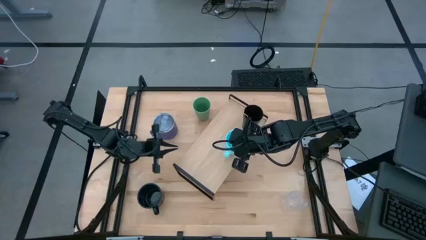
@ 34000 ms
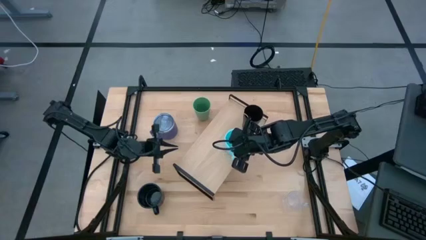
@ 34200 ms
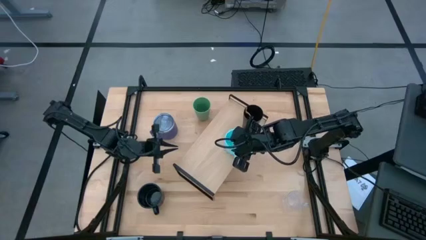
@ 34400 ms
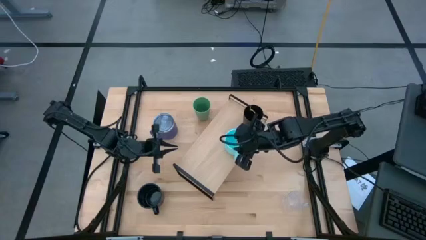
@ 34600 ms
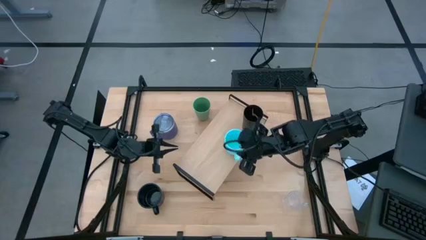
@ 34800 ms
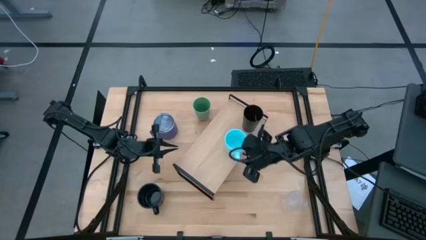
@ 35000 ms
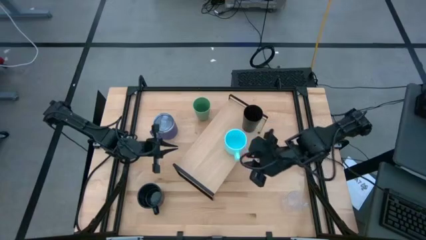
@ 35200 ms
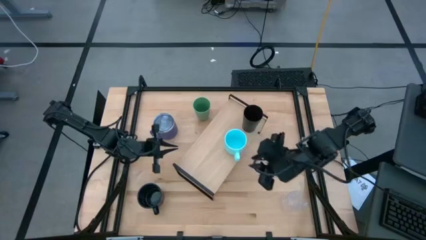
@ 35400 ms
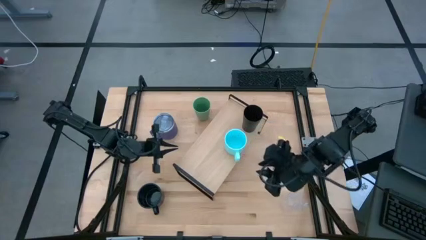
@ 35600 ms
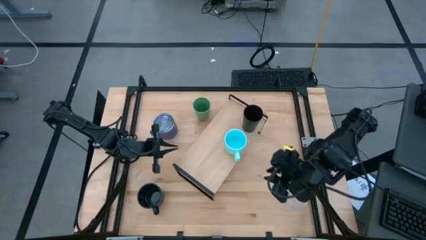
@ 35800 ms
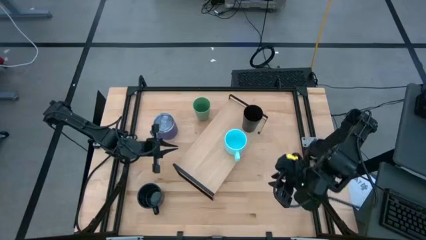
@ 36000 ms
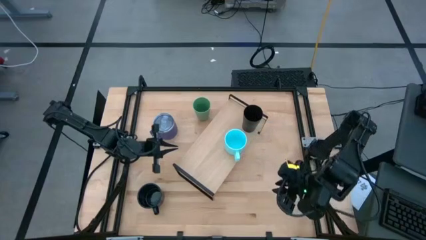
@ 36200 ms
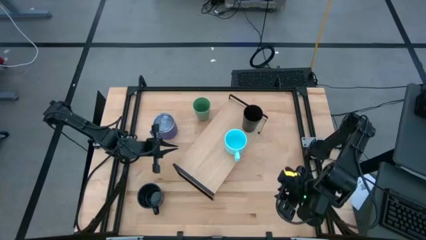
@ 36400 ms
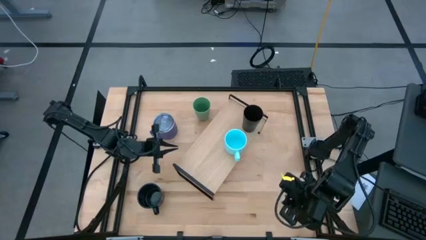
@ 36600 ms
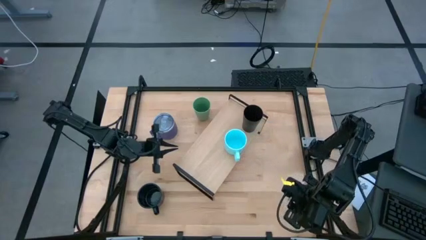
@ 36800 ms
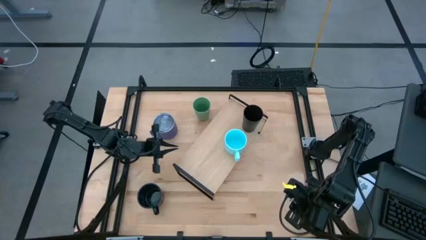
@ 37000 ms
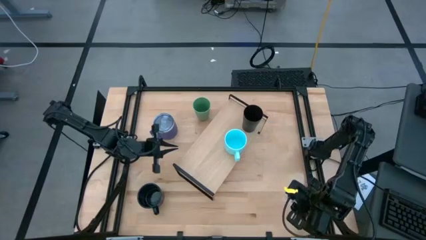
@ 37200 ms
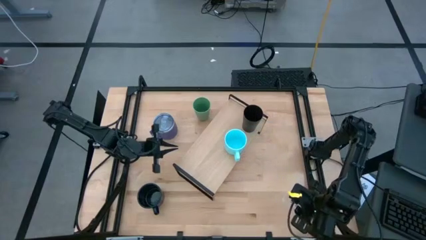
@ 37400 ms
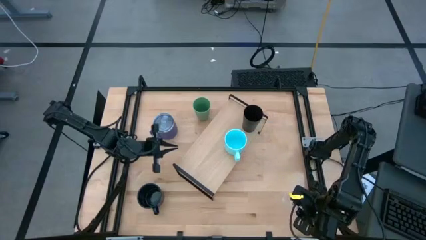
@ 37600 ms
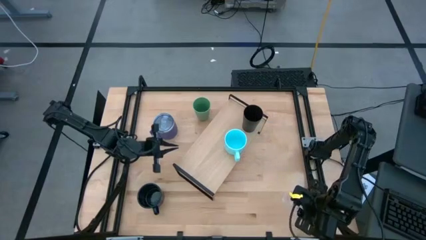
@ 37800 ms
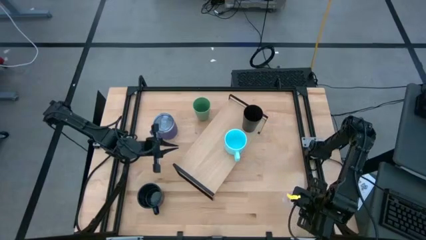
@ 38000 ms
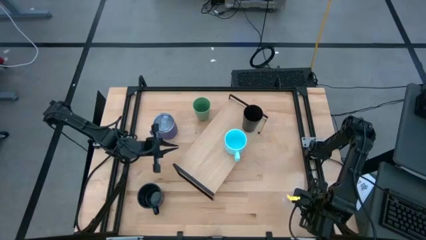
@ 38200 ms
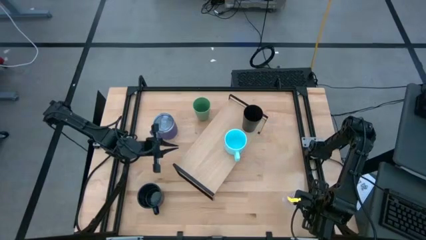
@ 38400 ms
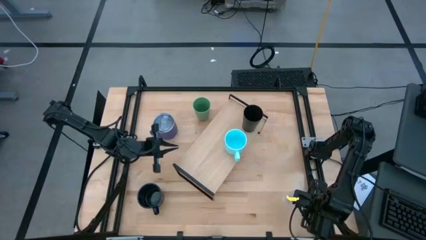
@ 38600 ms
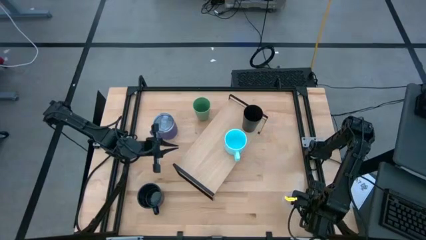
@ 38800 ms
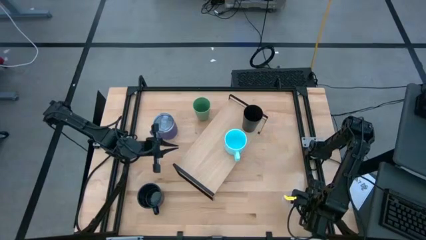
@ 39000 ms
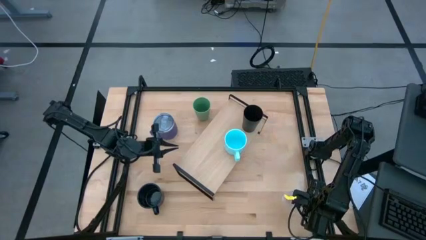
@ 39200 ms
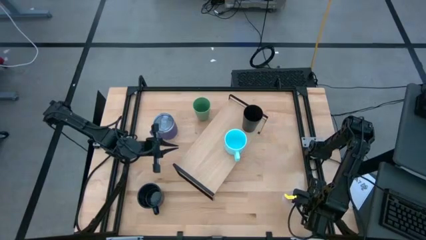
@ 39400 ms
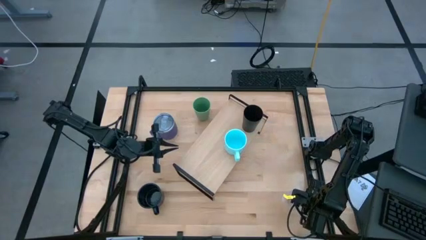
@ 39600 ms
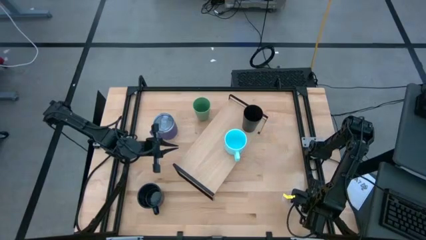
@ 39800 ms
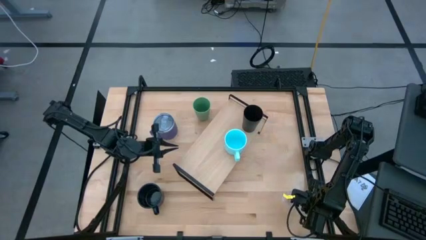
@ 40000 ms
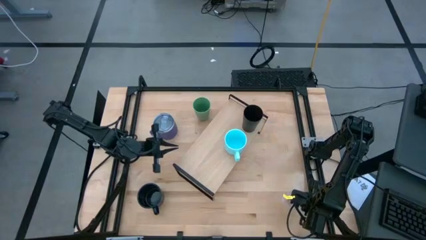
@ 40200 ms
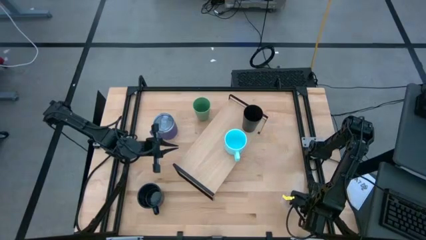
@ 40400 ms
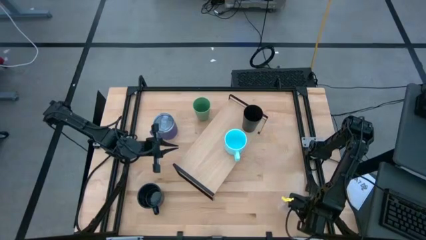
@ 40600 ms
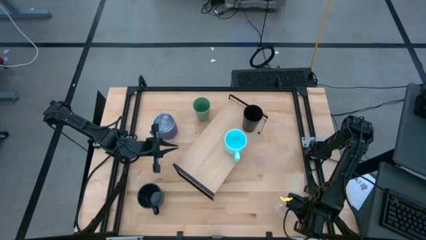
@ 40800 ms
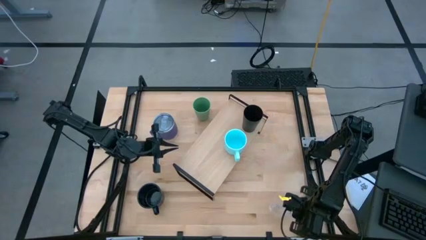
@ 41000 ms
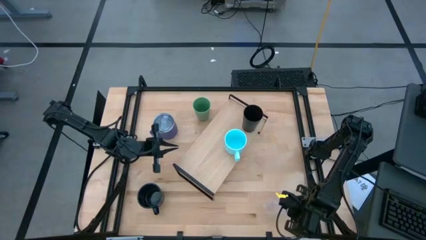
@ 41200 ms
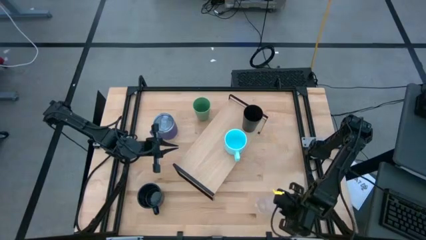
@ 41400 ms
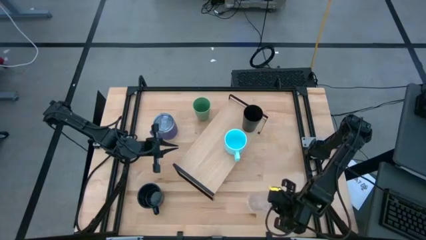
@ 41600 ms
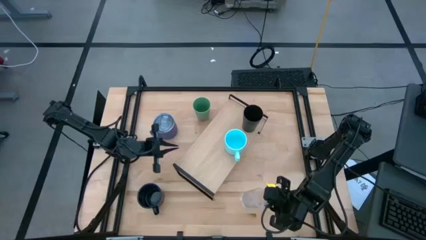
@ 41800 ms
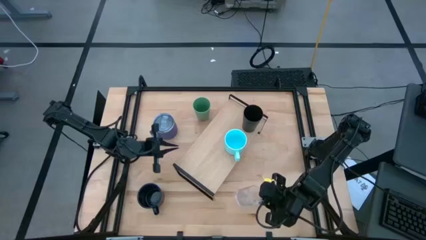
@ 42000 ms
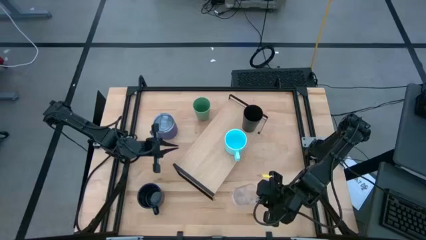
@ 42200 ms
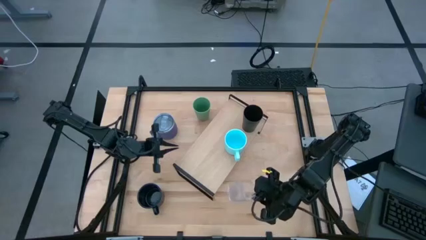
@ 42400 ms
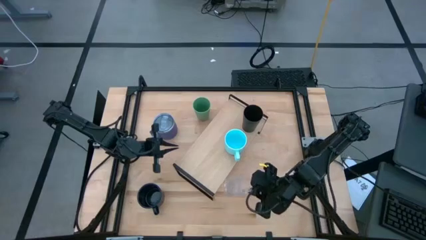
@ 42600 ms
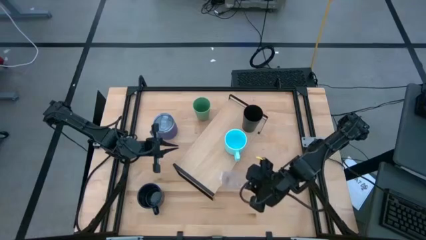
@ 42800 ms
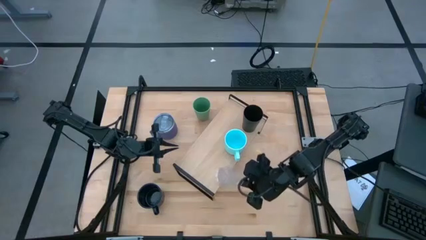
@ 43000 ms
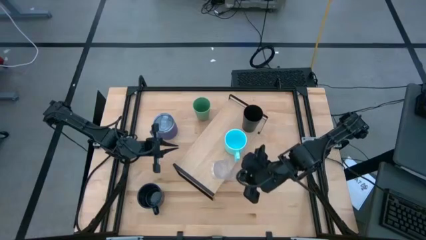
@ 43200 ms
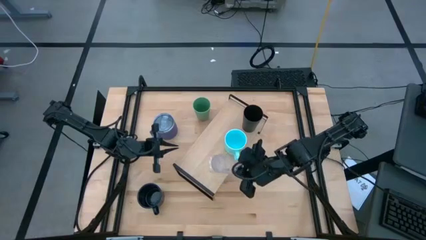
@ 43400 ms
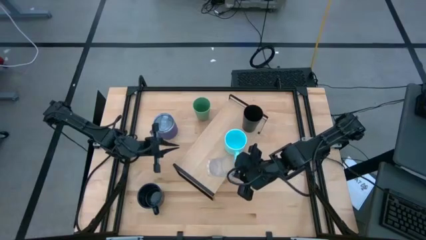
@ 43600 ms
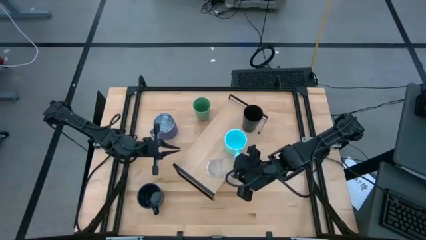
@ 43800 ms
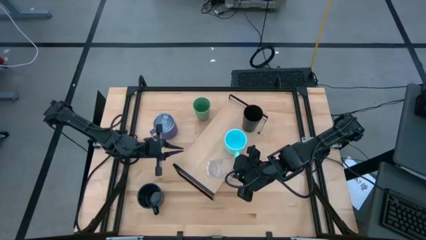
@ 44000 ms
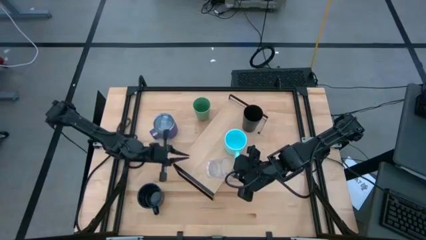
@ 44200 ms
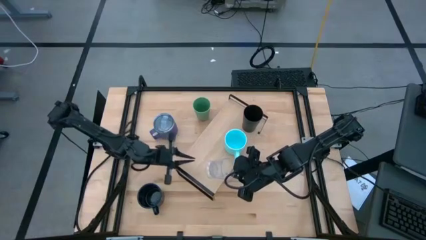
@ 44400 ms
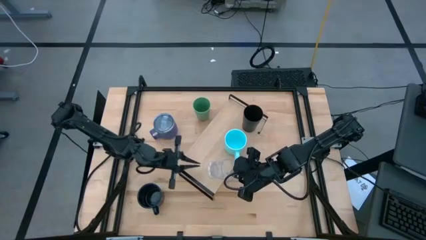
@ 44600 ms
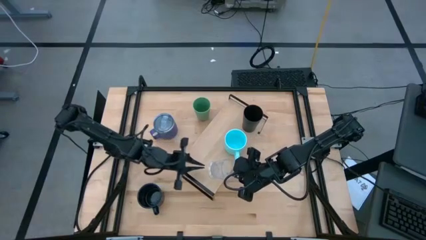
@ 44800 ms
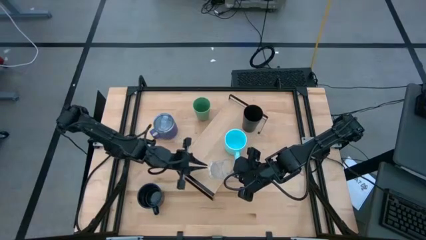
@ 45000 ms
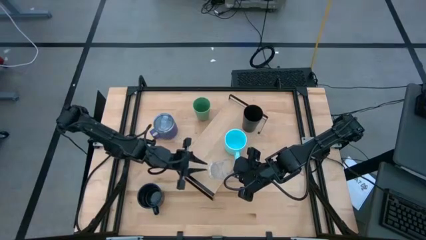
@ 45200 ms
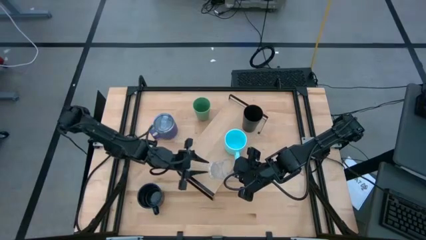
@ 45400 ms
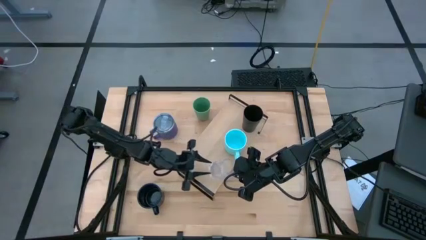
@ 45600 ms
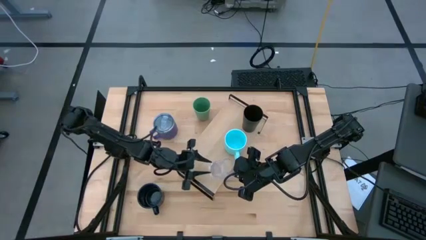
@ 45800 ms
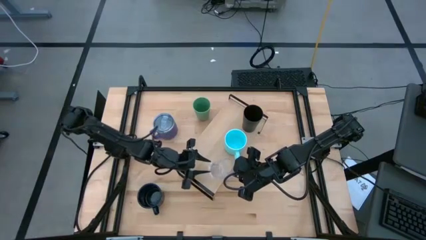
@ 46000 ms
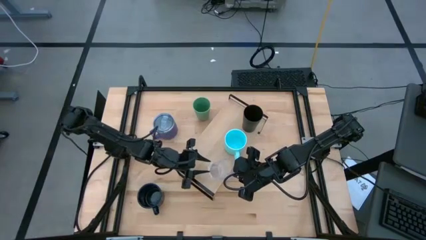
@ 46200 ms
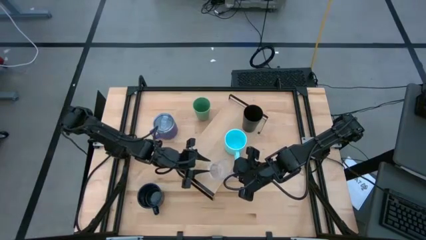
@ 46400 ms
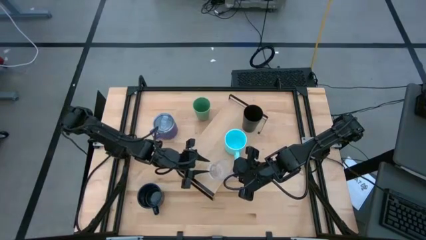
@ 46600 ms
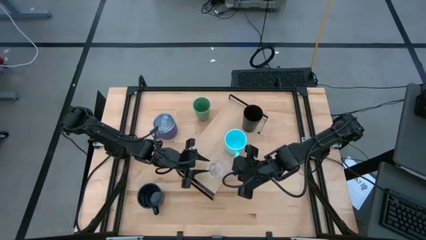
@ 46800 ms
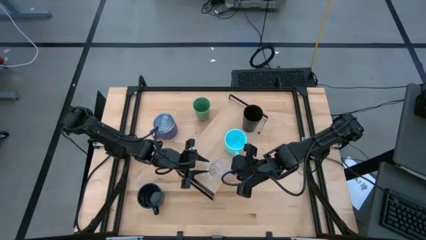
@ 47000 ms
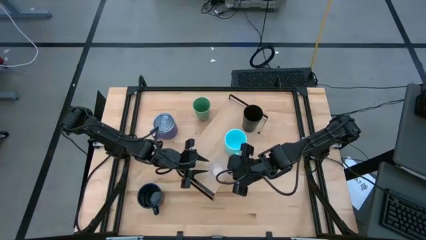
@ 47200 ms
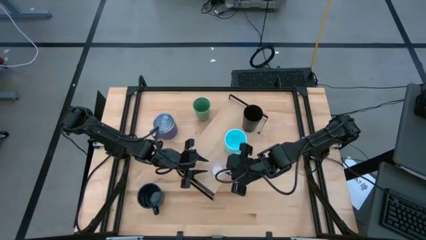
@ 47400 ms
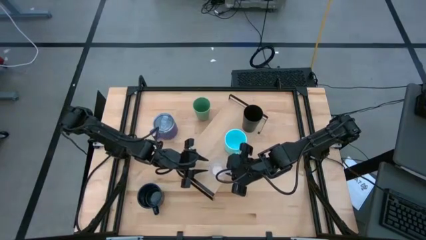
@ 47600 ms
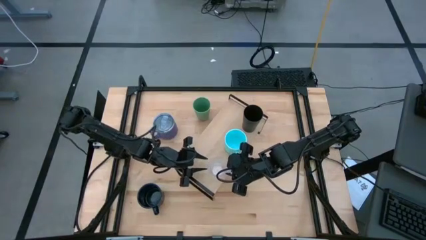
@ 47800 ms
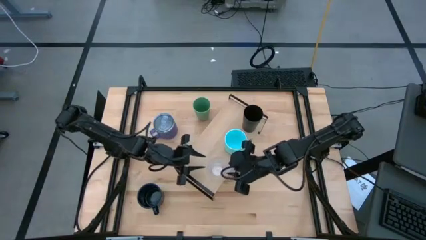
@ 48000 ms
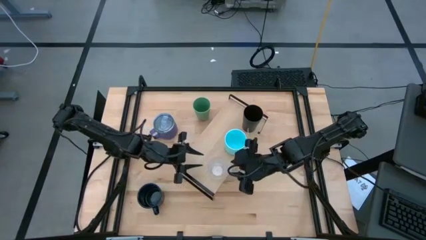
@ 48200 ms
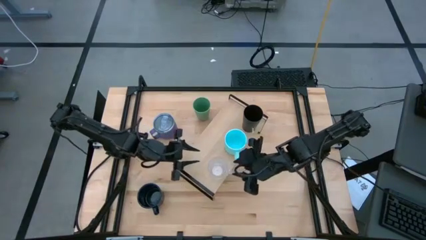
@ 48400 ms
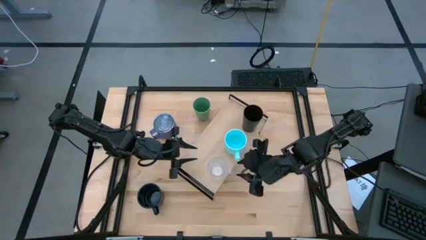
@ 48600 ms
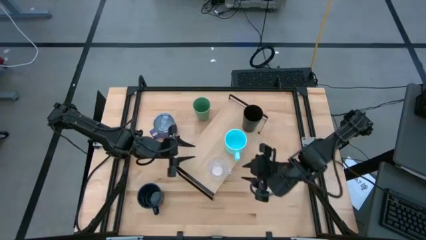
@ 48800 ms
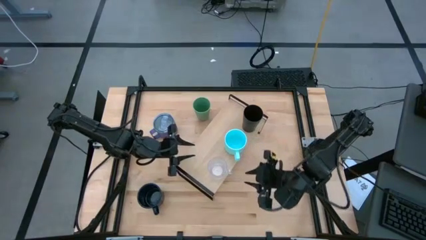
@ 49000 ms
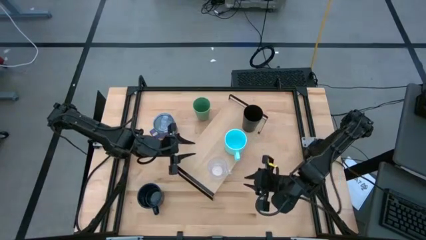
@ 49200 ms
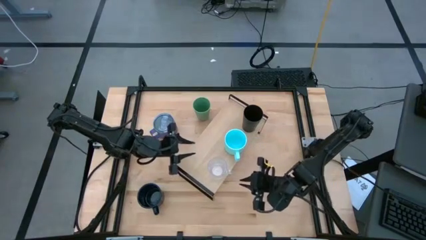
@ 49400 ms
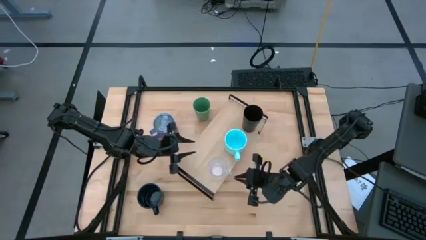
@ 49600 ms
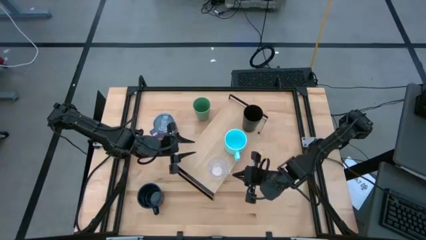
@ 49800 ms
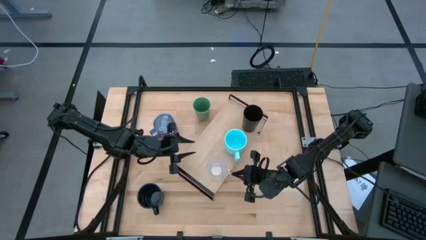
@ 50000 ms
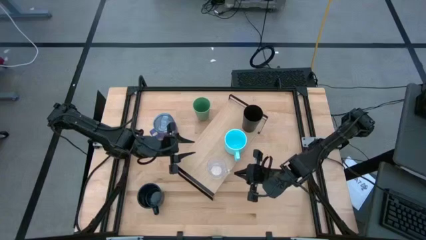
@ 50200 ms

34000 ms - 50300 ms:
Task: Stack small to large cups/mugs on shelf
Put the transparent mug on the shelf
